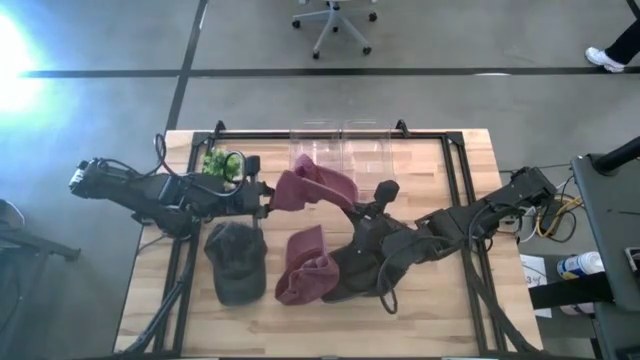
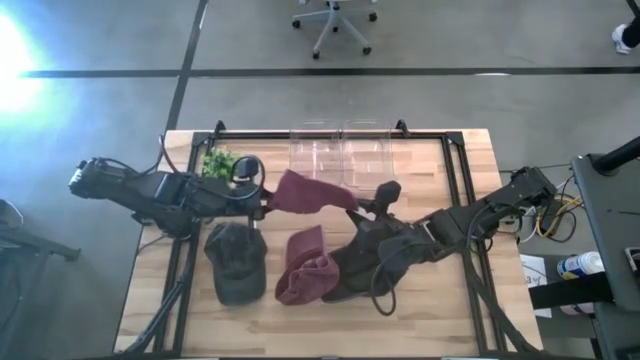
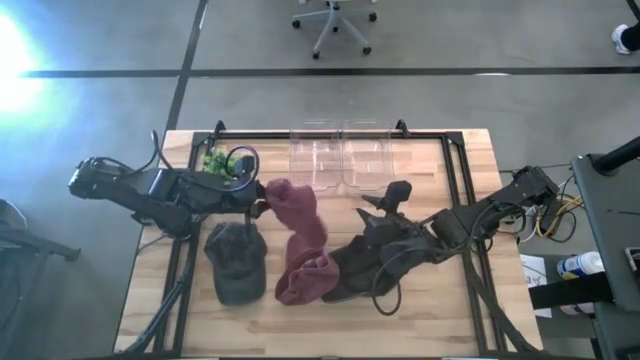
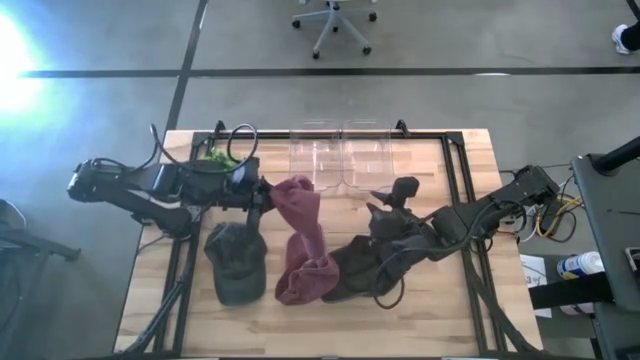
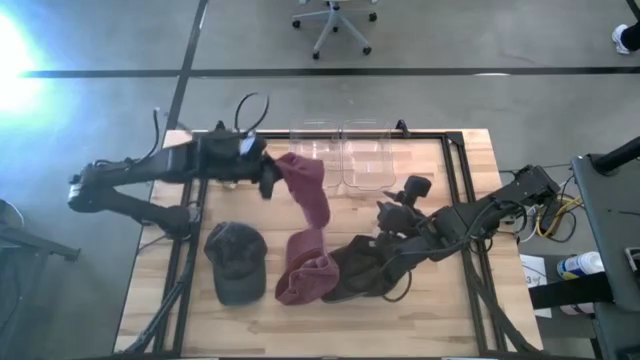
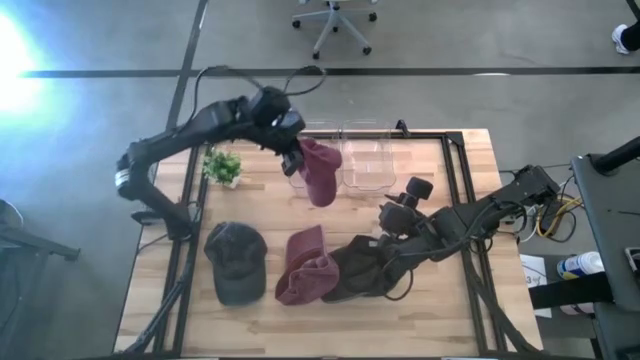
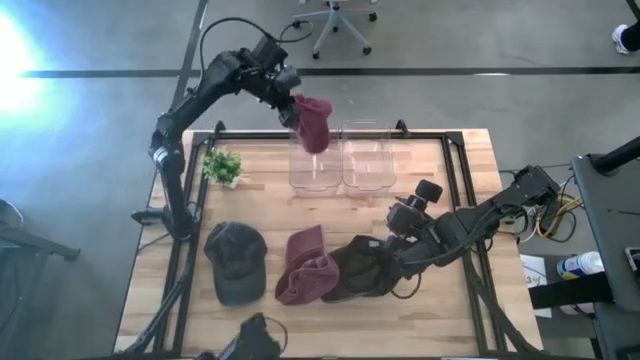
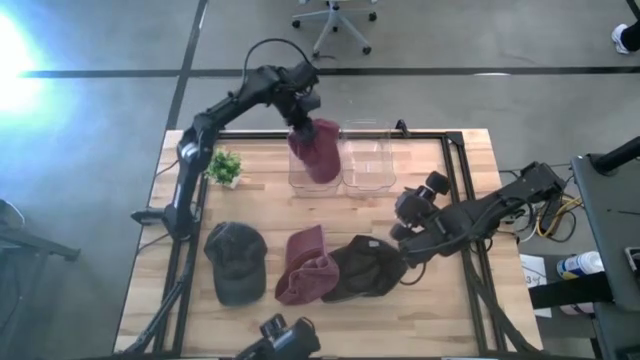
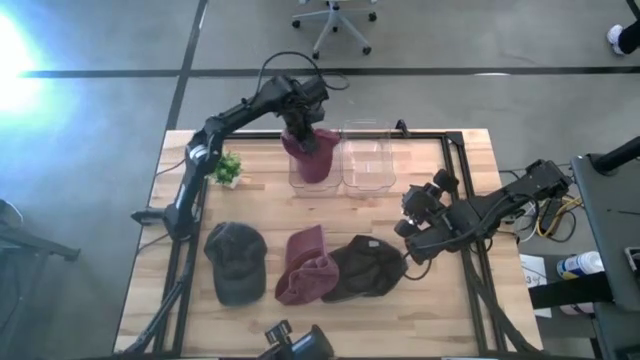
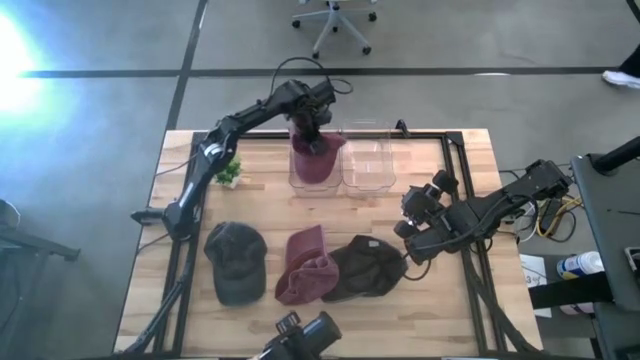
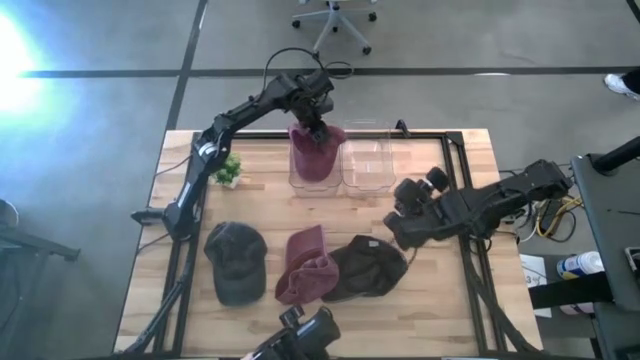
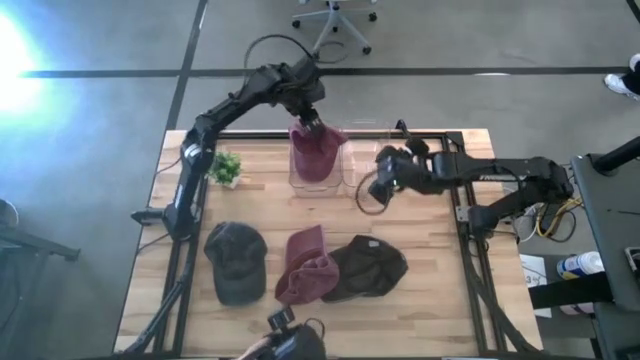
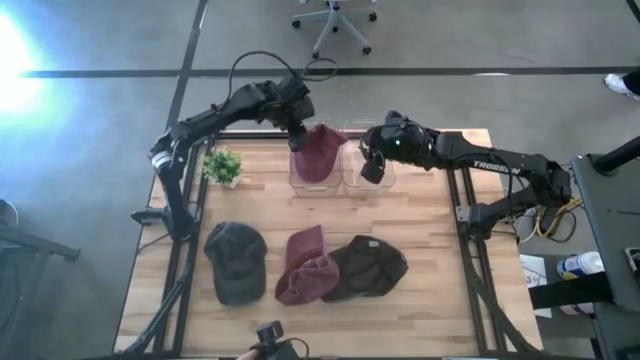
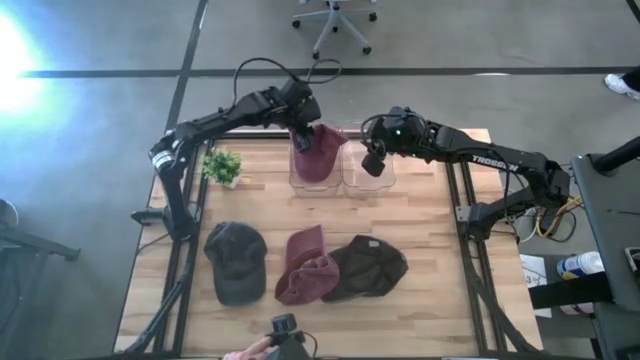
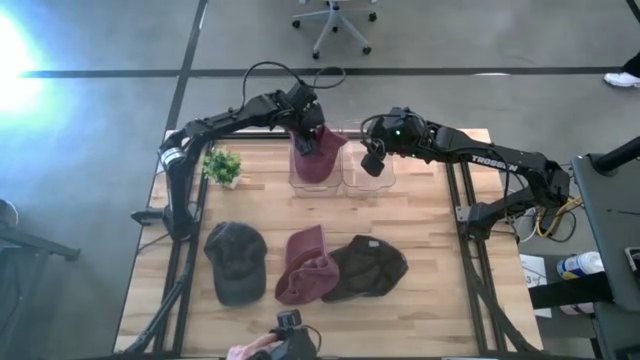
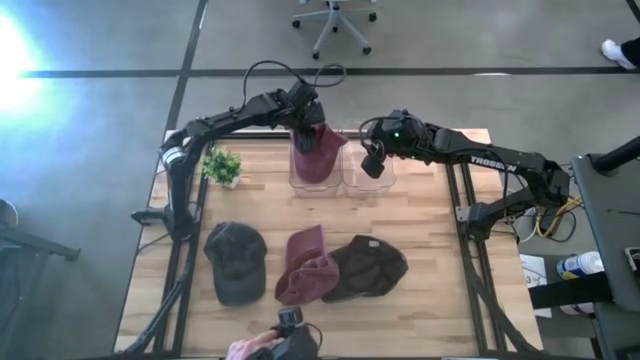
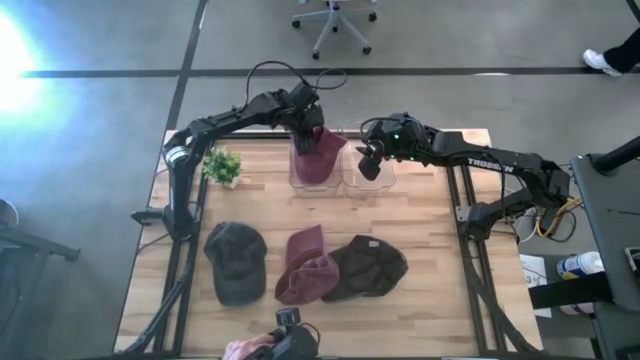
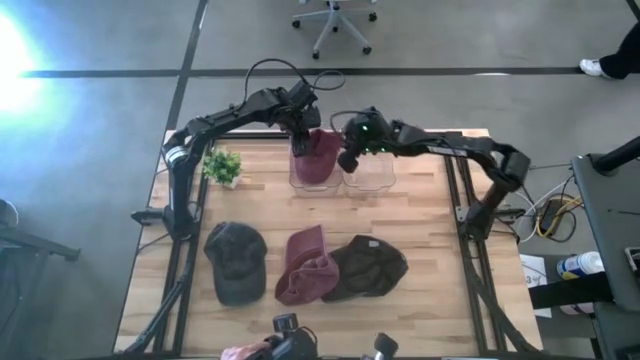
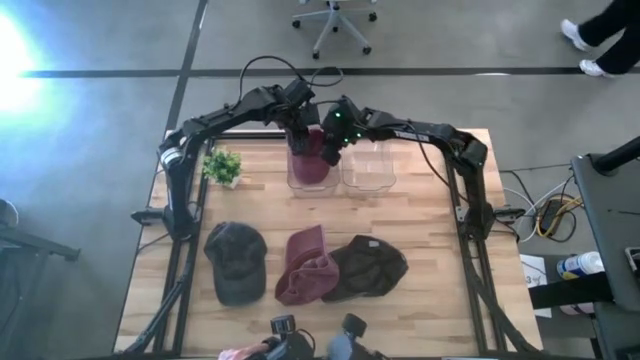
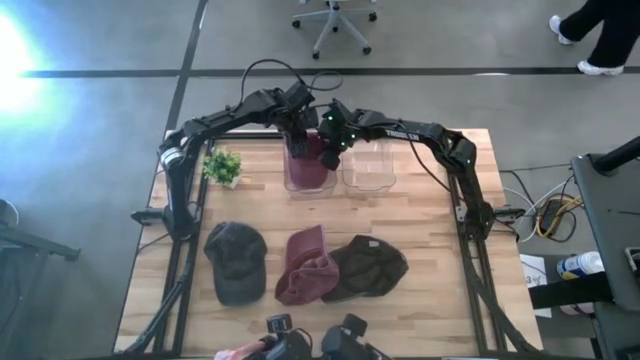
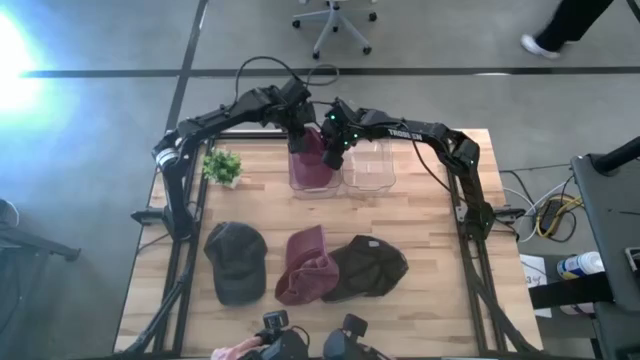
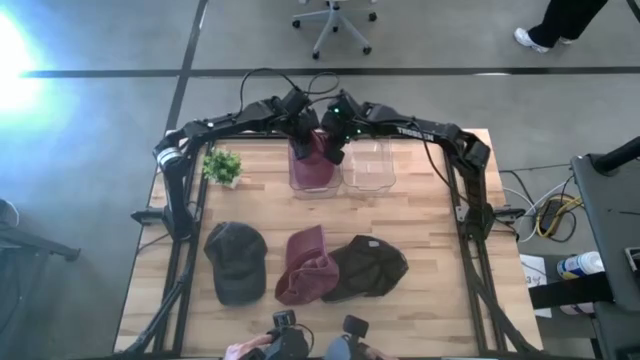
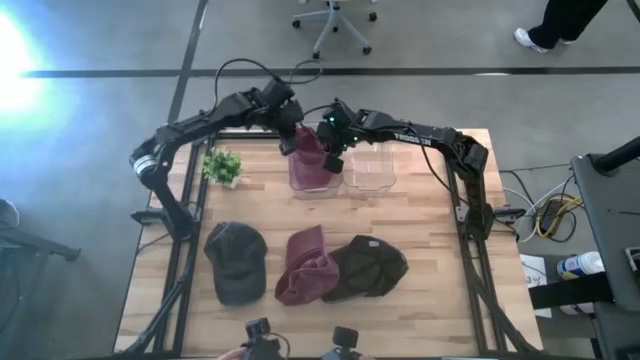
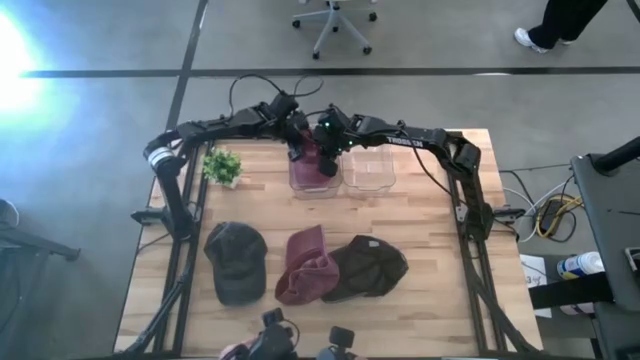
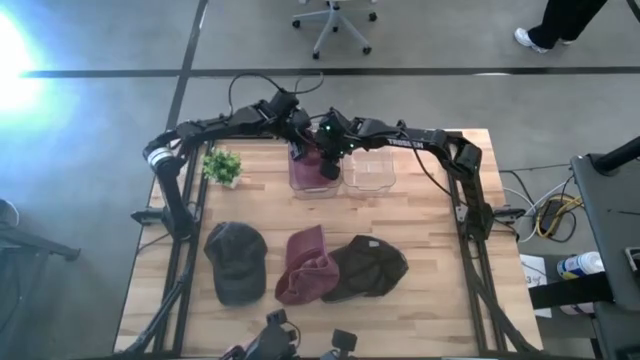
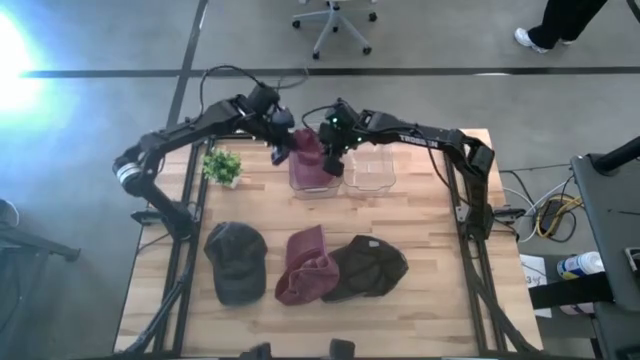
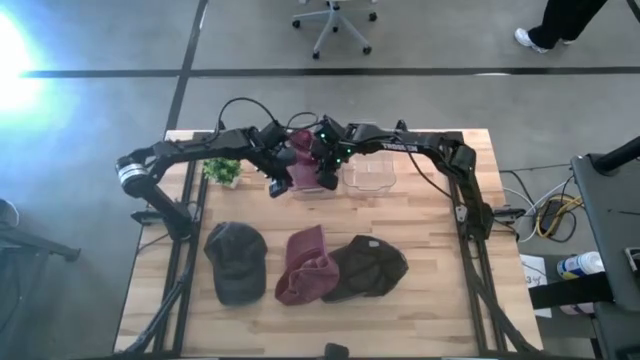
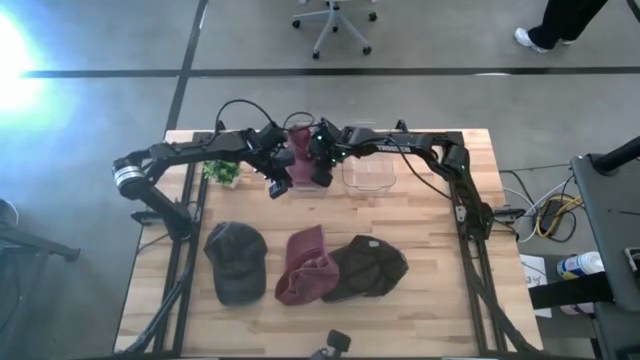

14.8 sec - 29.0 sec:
Task: Pick & Place hat
Put the bottom red cap into the left transparent bin

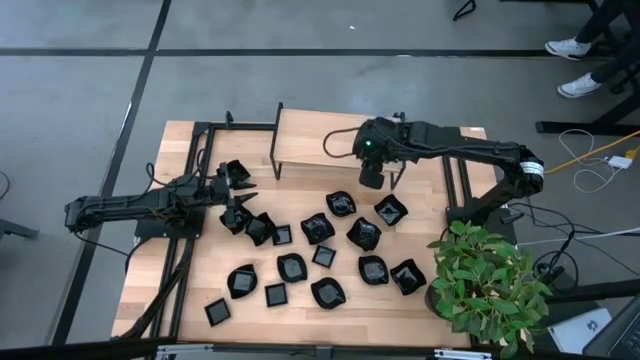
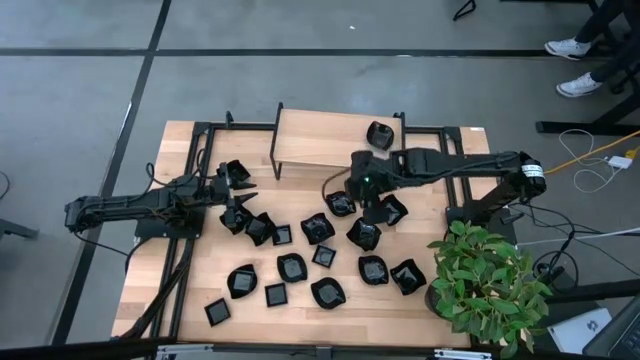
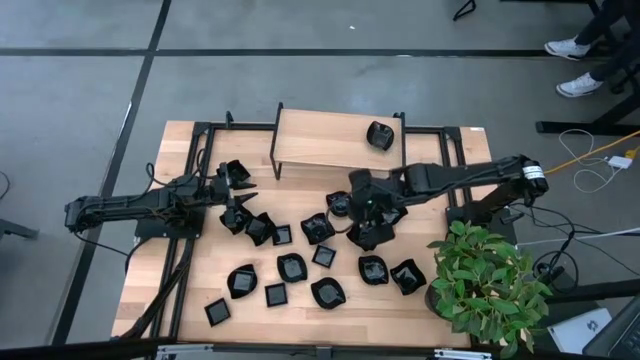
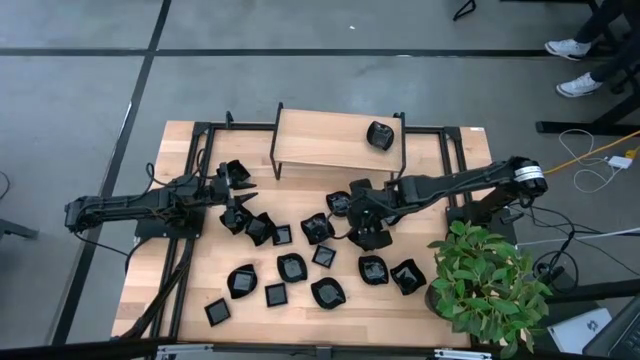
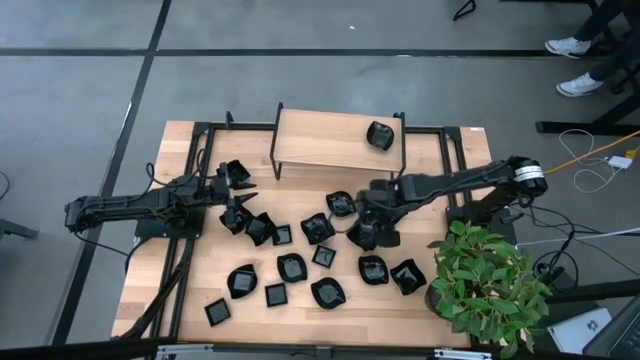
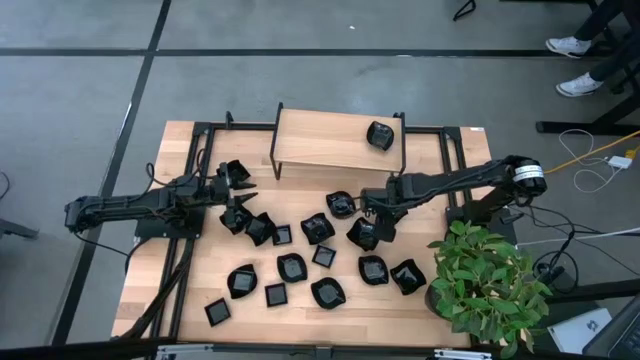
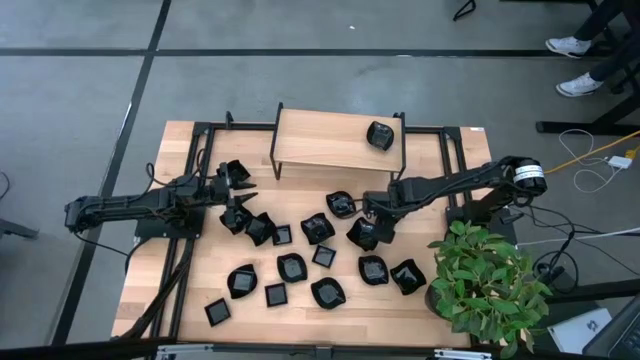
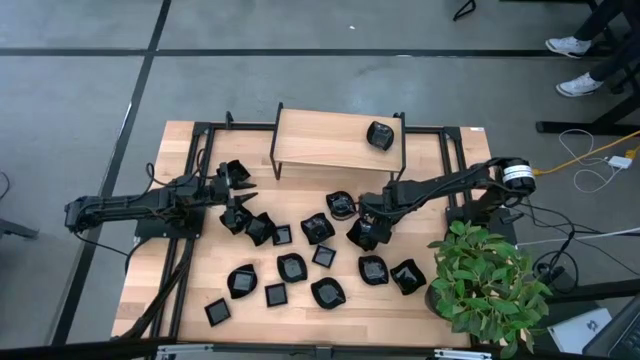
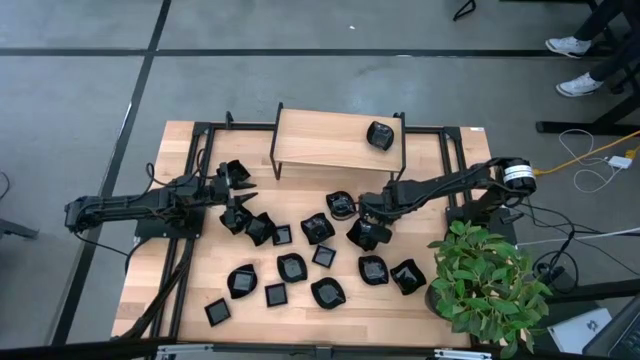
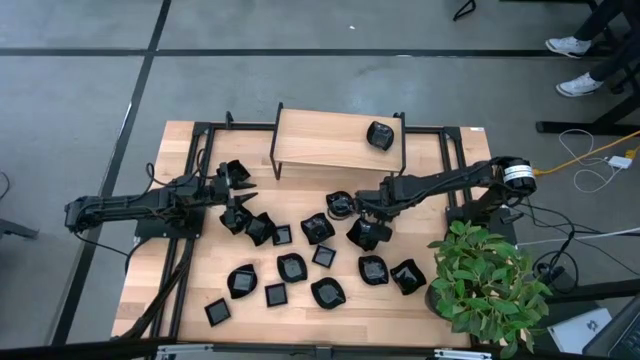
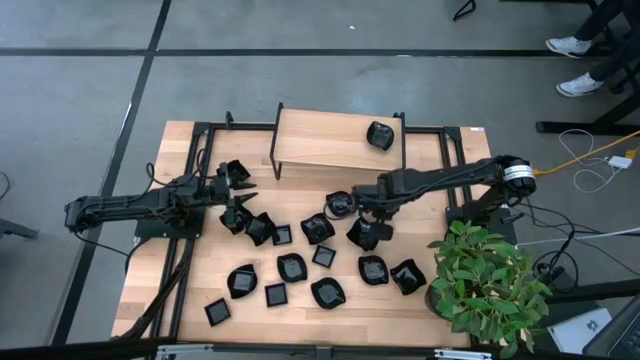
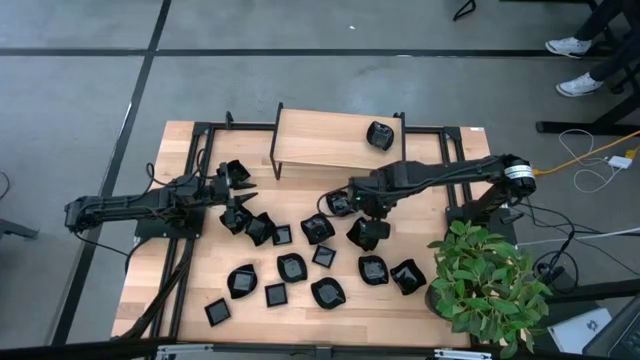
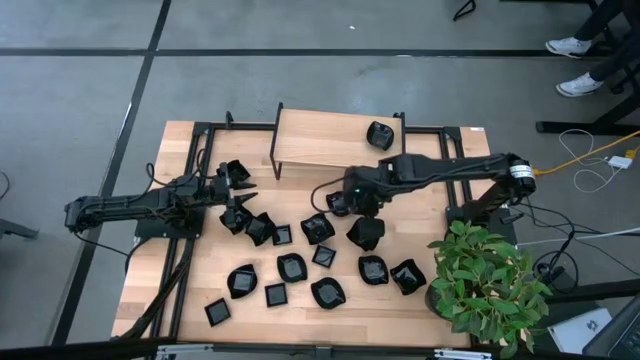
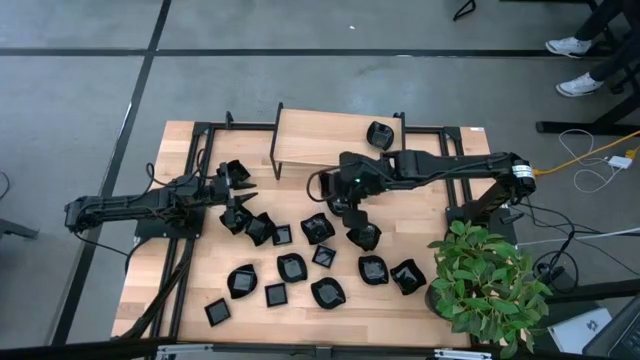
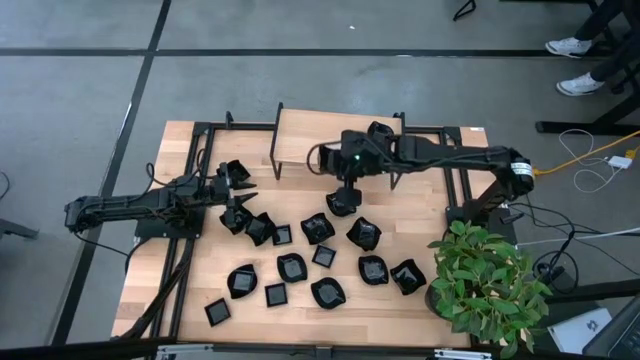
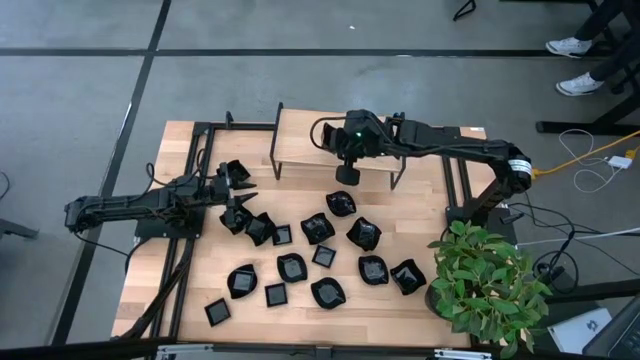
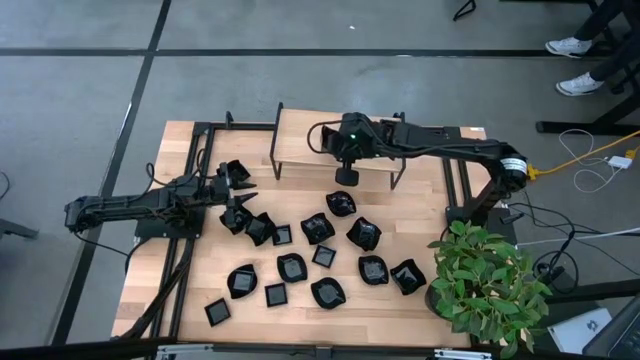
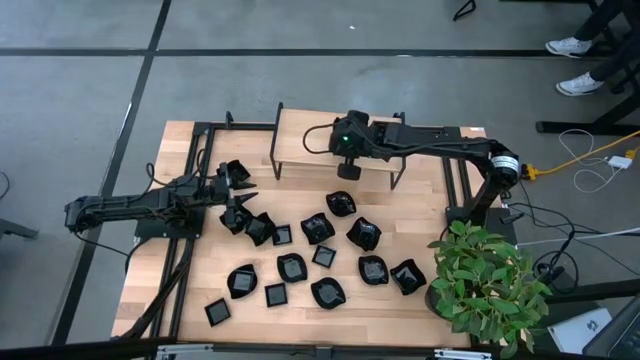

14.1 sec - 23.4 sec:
Task: Pick & Place Mini shaped plates
Put the distorted square plate on the shelf
